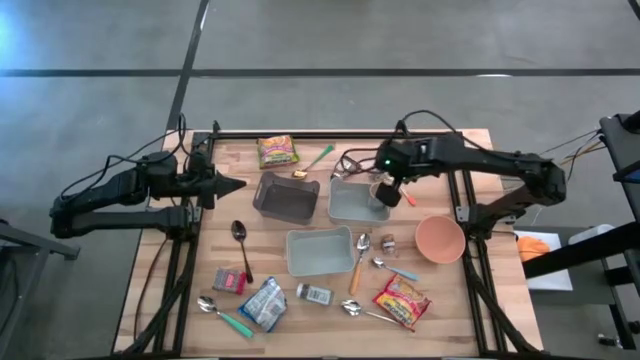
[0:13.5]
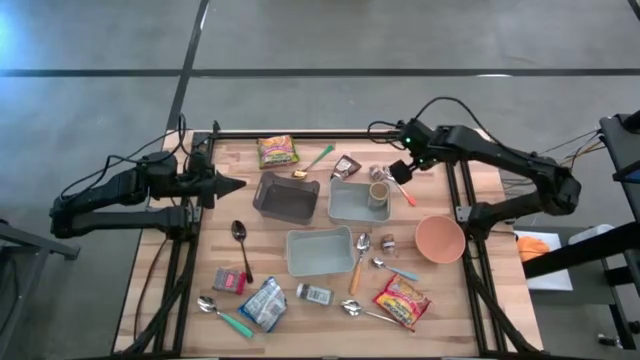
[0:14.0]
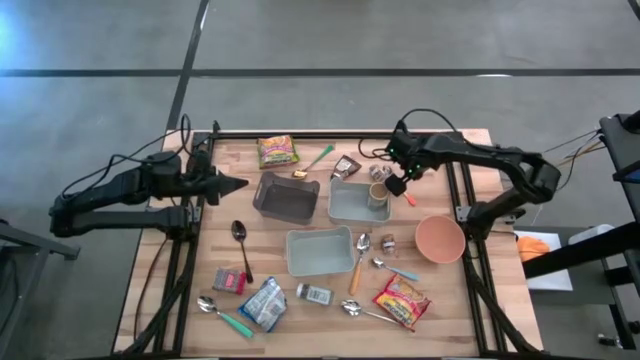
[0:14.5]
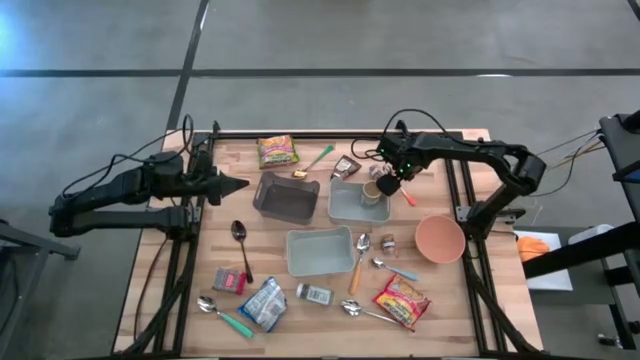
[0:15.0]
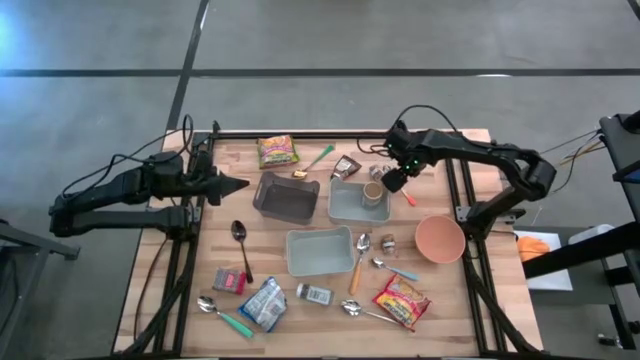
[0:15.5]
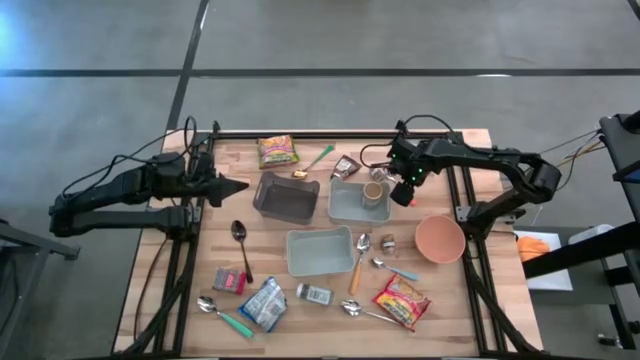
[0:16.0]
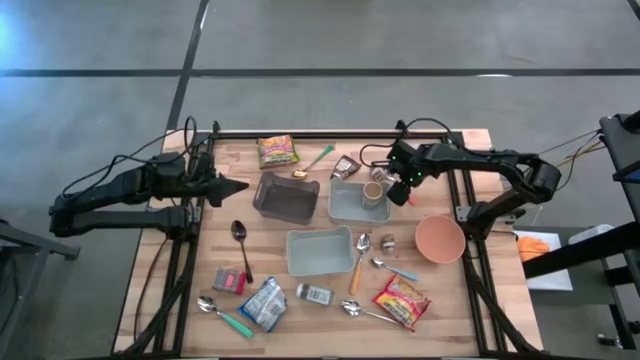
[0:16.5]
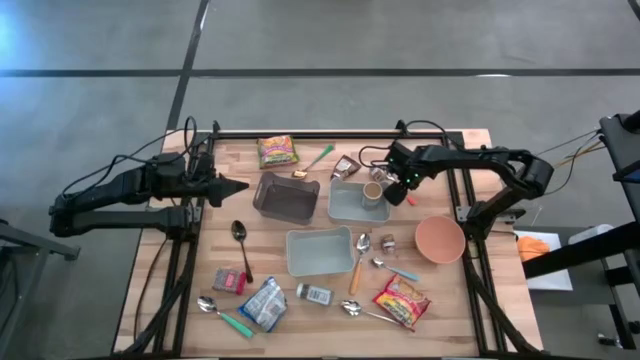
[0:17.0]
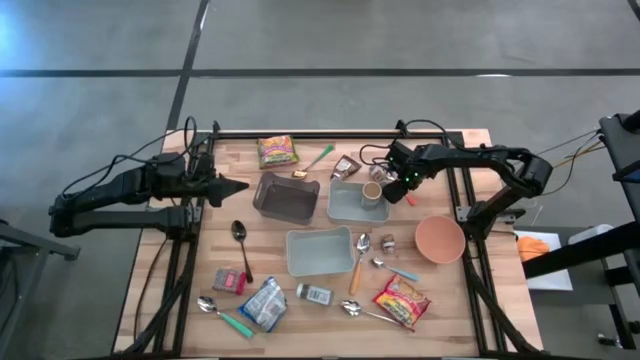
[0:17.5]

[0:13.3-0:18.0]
Put the orange spoon into the bottom gray bin

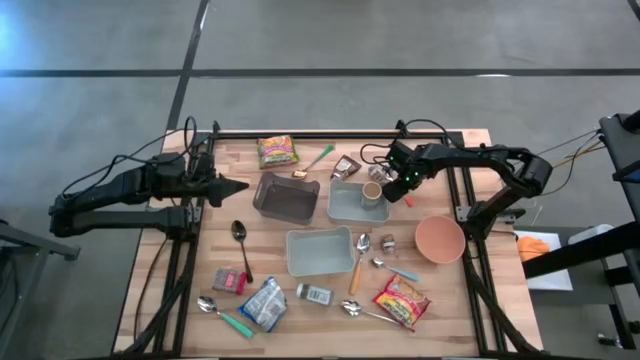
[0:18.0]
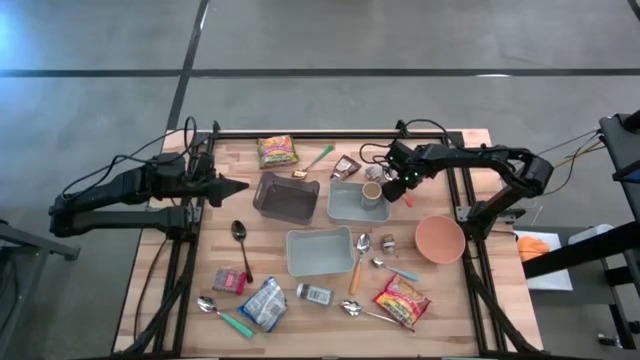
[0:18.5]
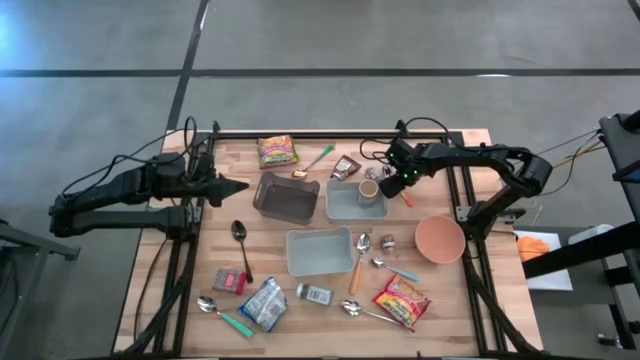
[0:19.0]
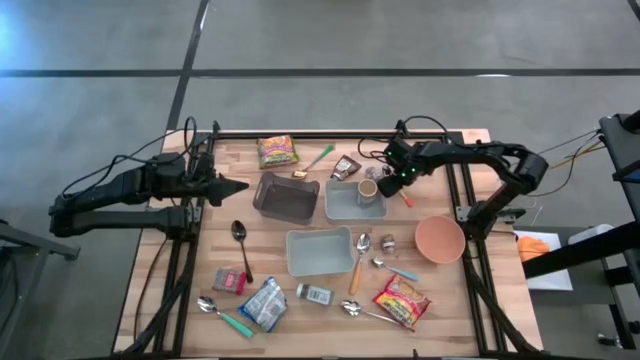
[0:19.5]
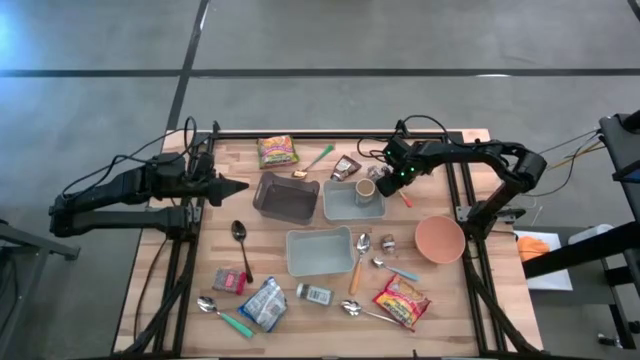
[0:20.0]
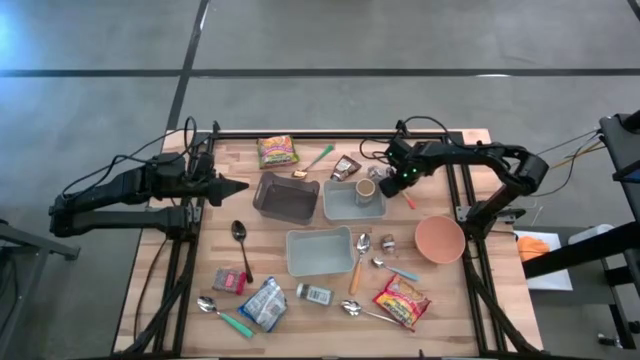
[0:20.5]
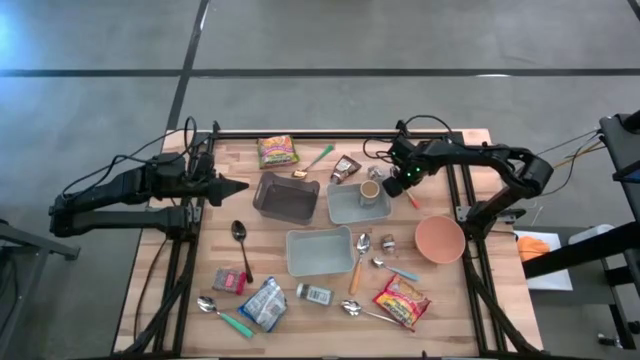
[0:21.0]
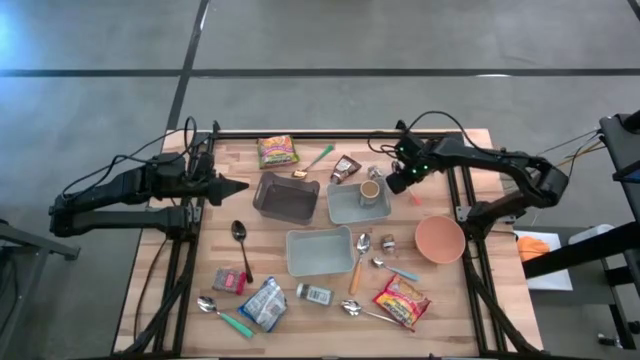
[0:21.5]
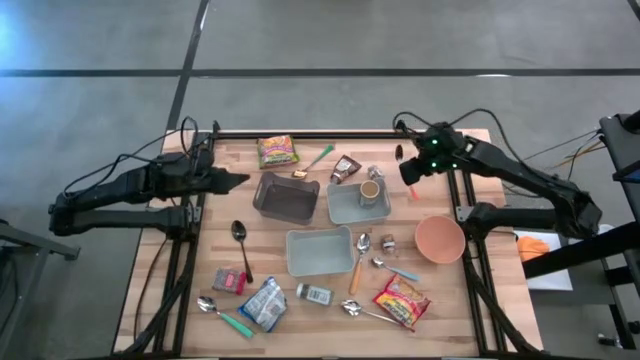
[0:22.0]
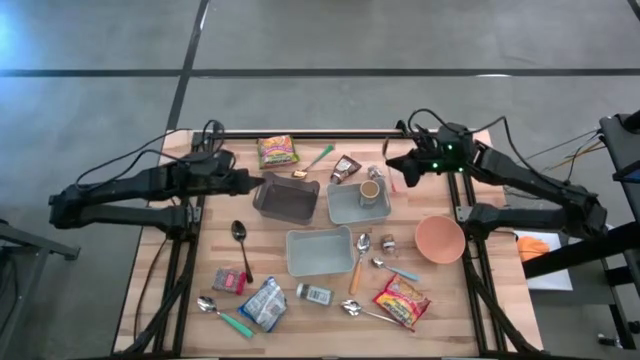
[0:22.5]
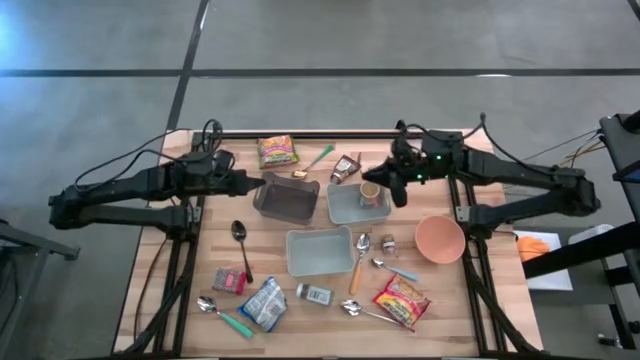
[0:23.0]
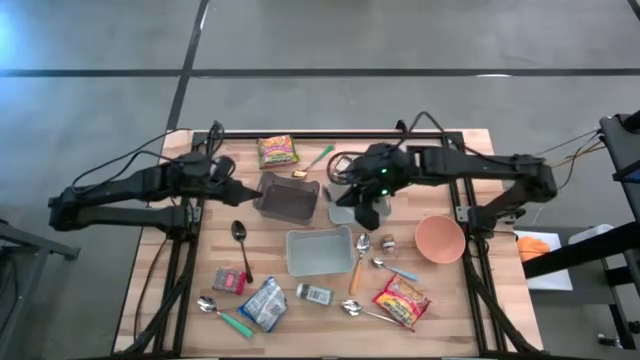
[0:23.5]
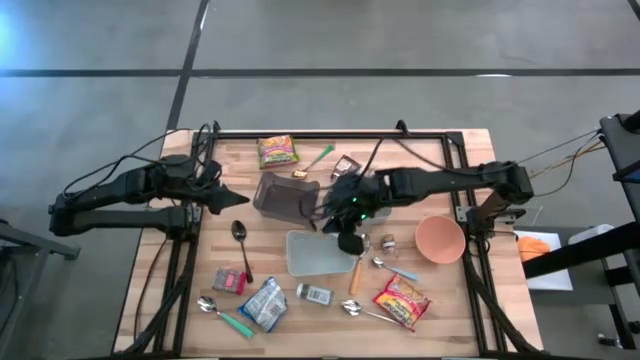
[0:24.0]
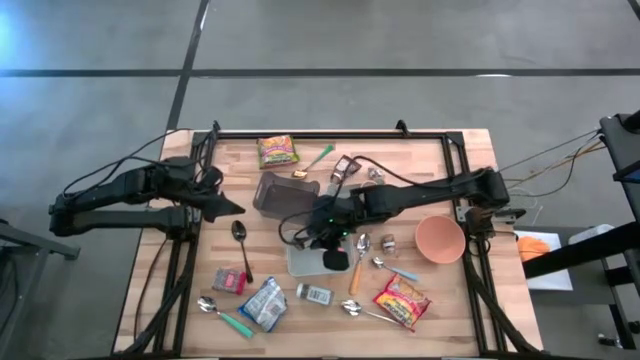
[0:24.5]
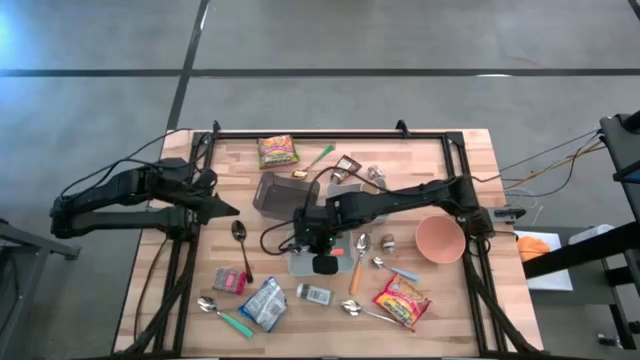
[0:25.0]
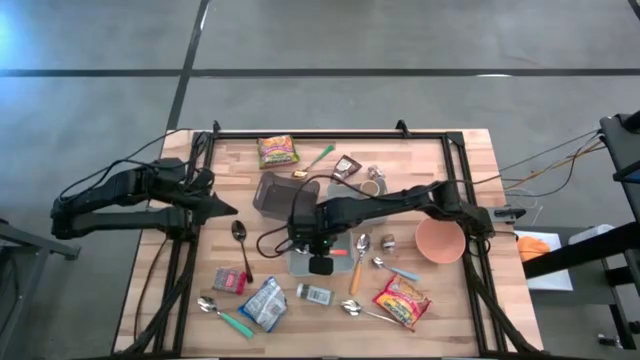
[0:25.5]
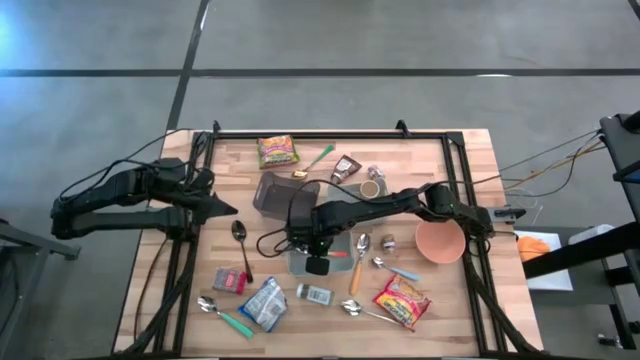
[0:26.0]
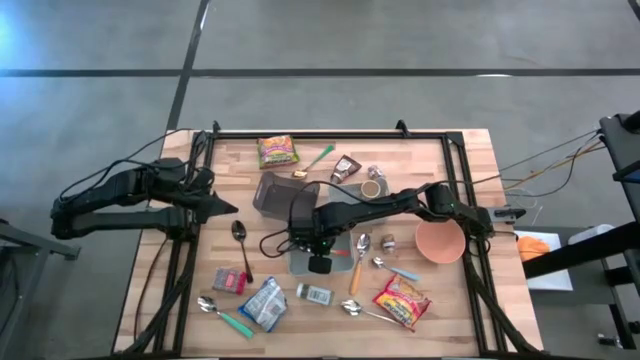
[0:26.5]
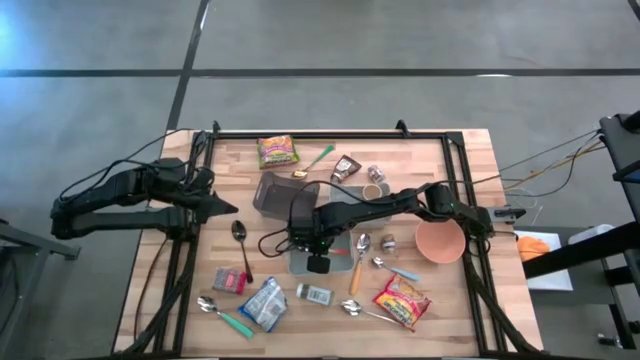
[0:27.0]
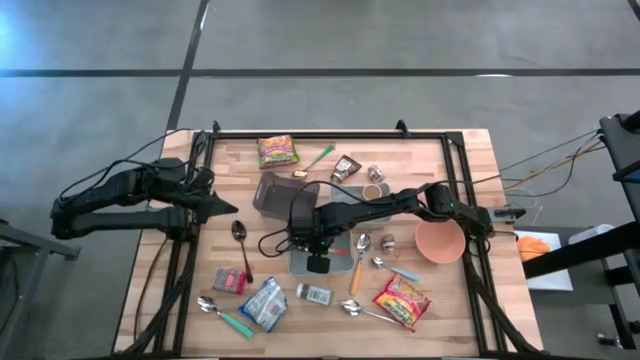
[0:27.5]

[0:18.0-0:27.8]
Put the white and orange spoon into the bottom gray bin

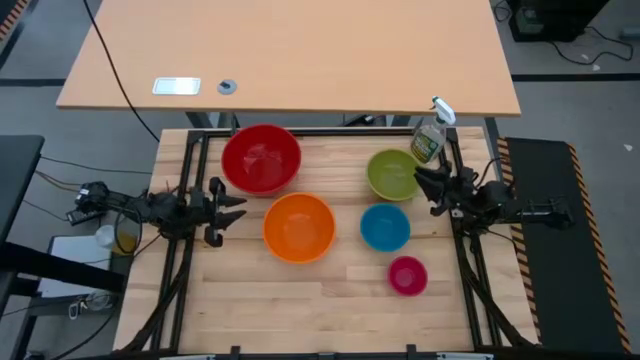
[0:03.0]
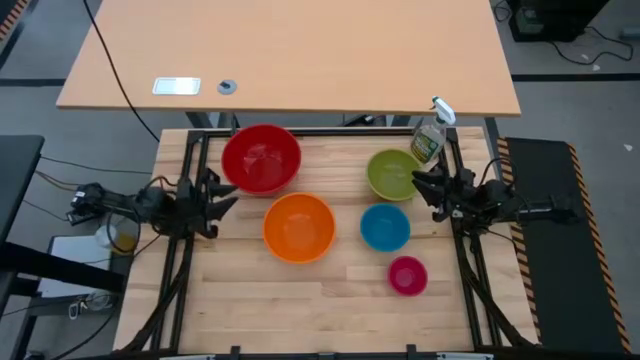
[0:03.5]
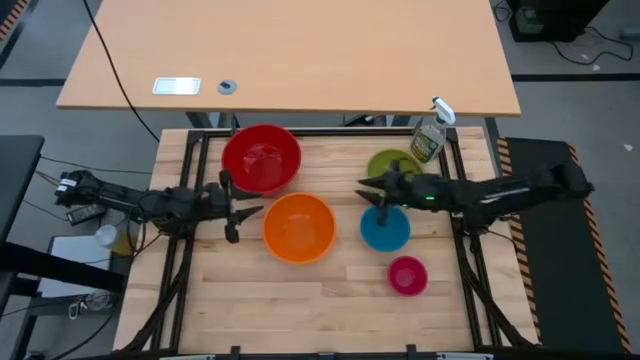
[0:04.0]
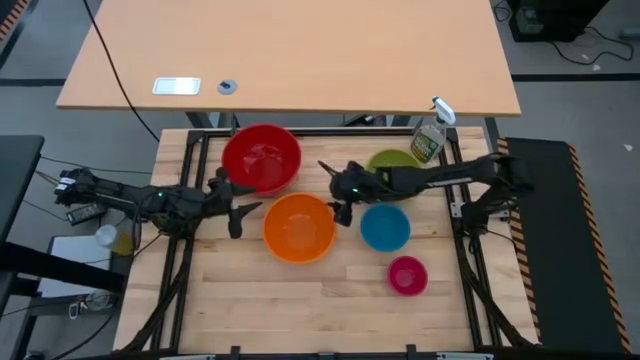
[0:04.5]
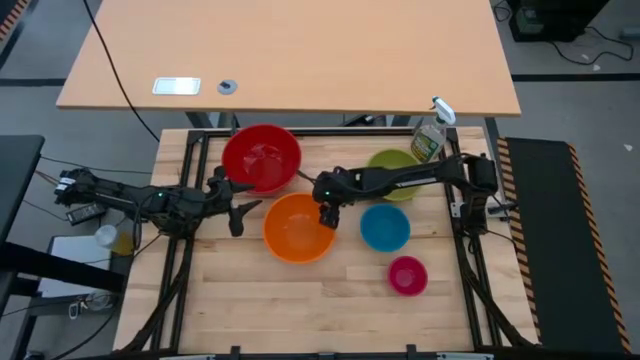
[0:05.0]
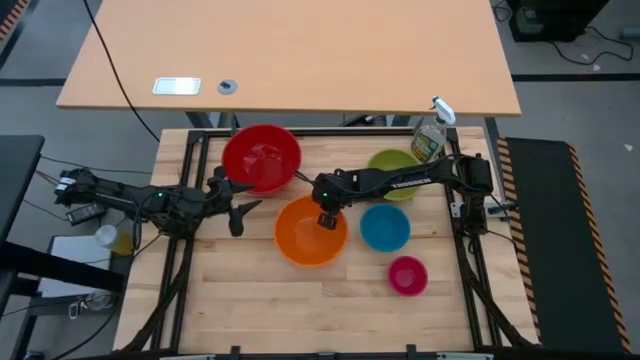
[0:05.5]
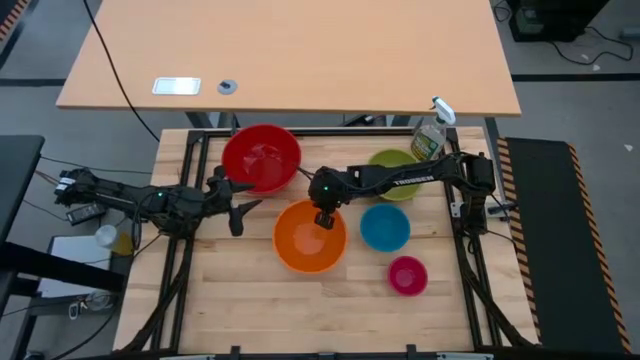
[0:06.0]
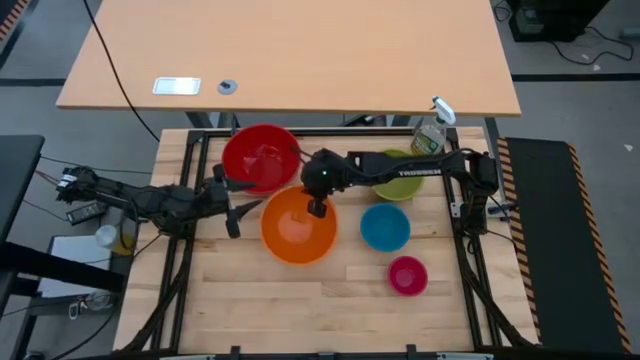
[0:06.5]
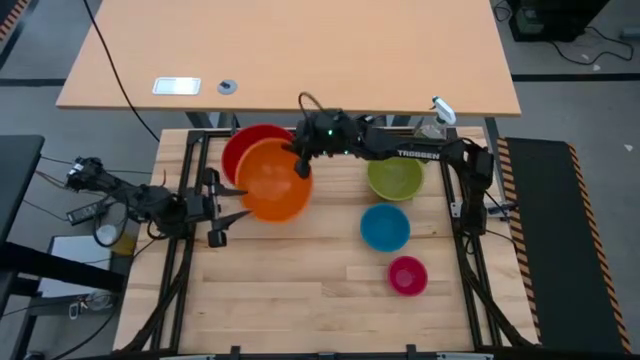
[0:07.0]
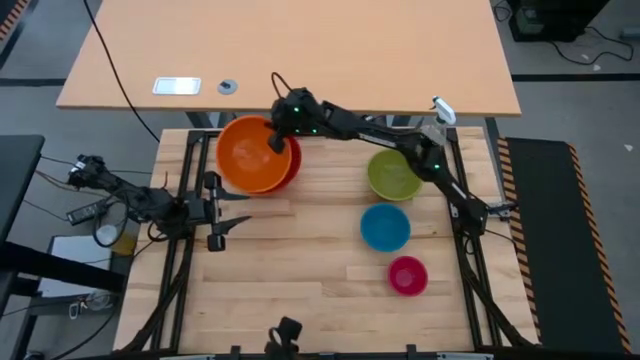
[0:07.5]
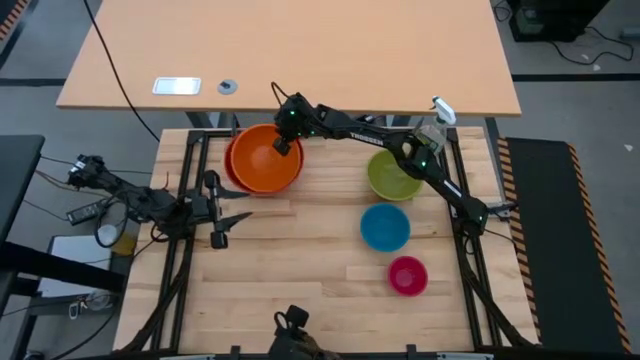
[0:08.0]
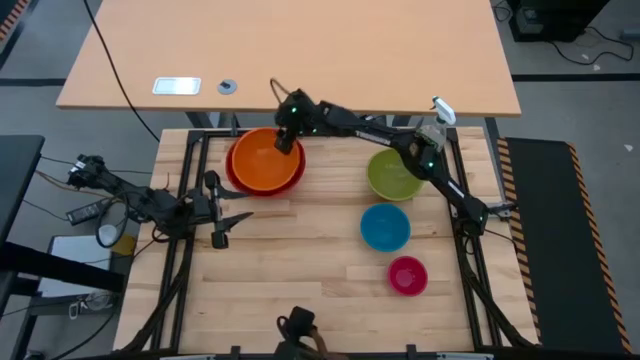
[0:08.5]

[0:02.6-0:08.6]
Stack the large orange bowl on top of the extra large red bowl
